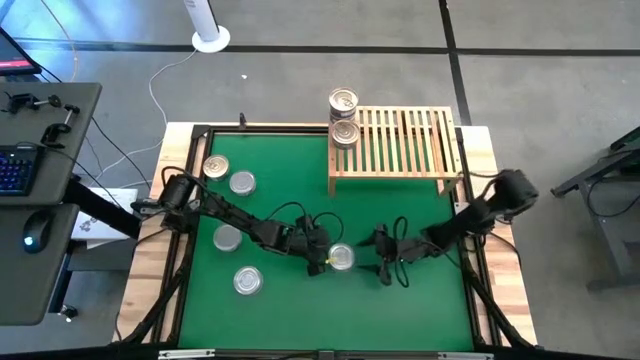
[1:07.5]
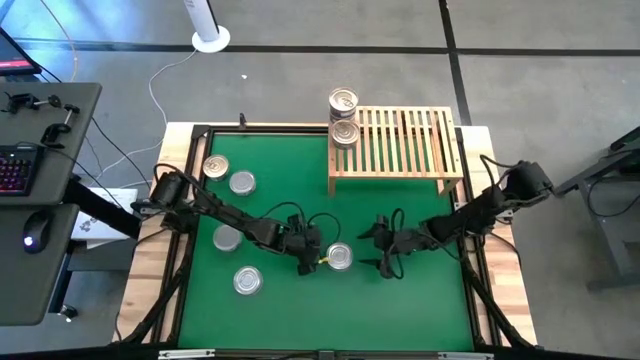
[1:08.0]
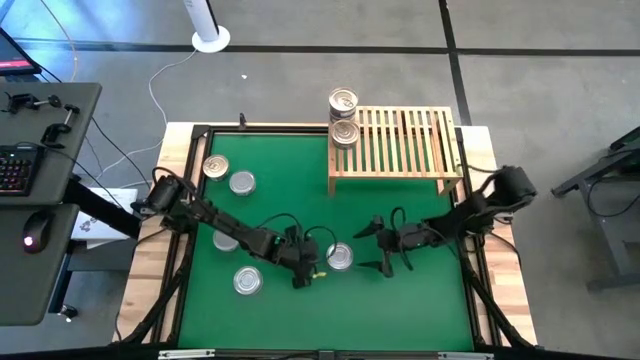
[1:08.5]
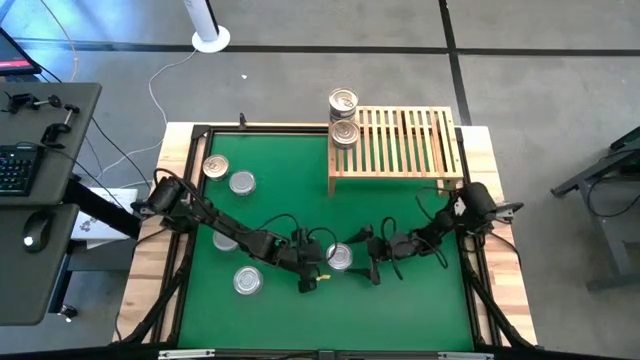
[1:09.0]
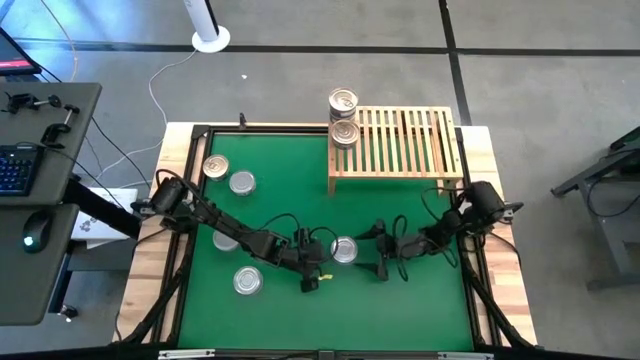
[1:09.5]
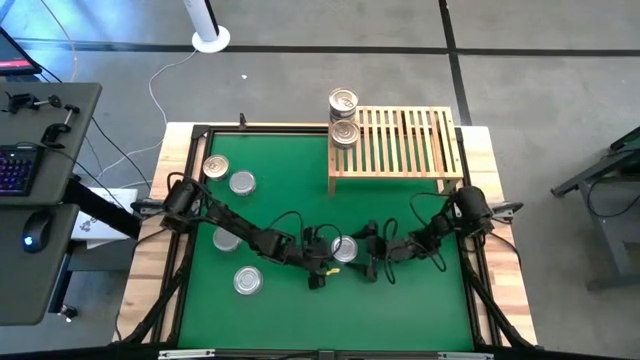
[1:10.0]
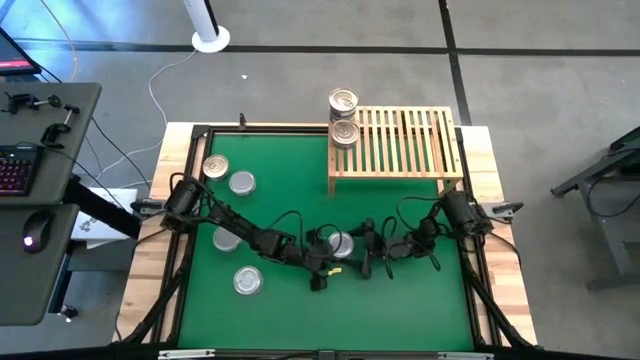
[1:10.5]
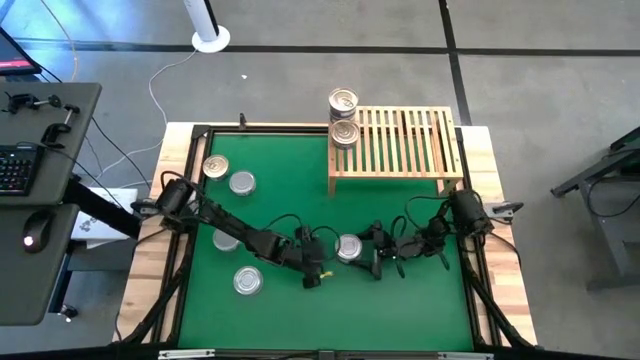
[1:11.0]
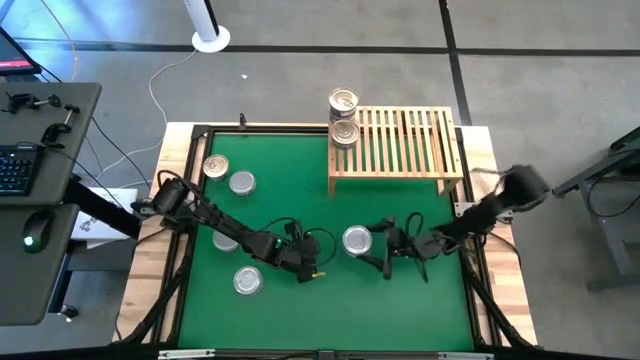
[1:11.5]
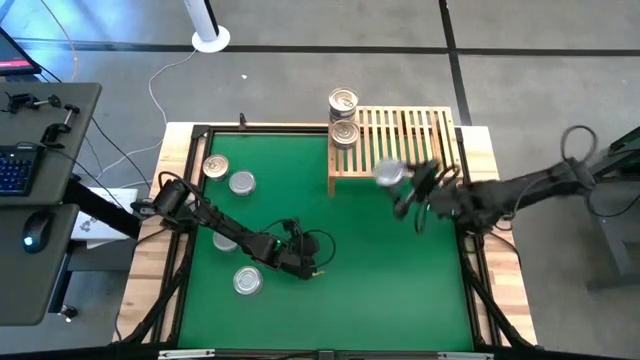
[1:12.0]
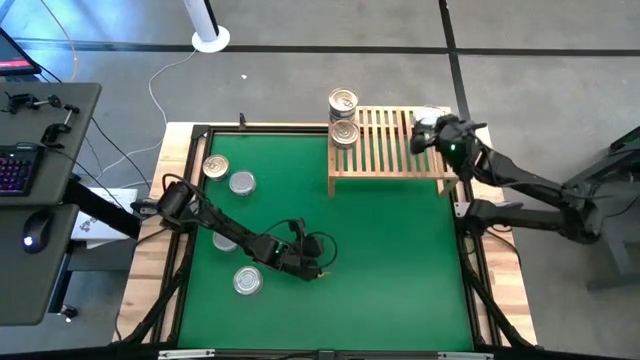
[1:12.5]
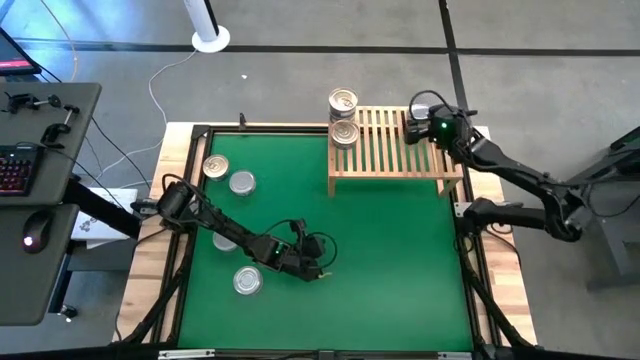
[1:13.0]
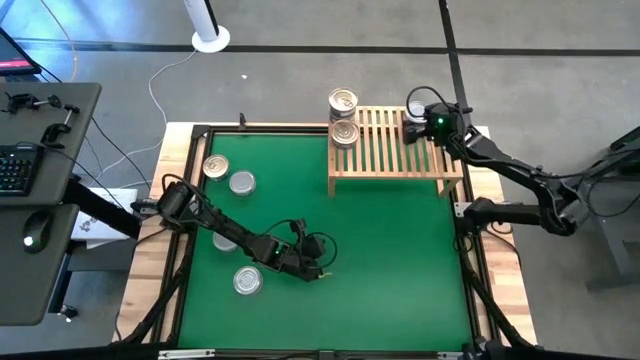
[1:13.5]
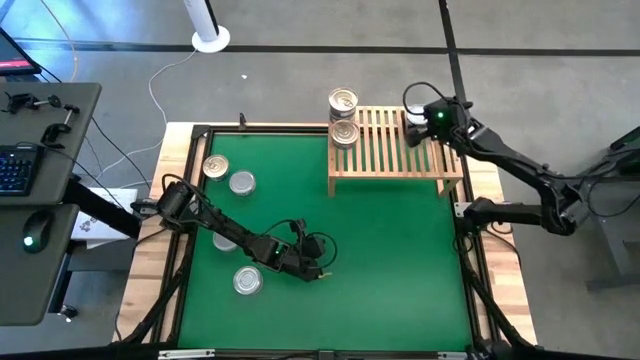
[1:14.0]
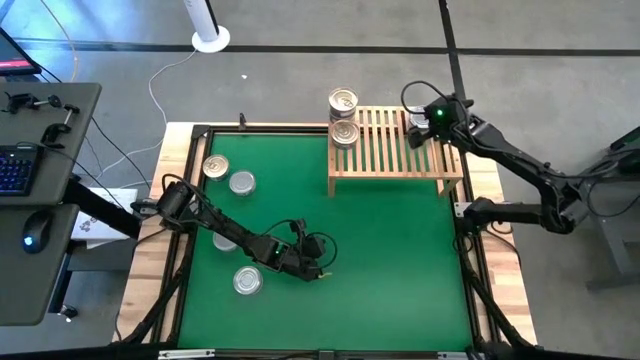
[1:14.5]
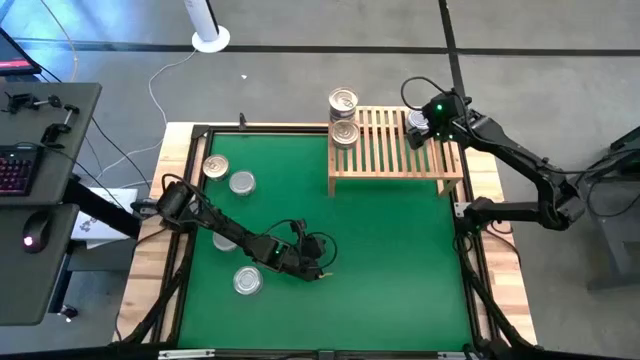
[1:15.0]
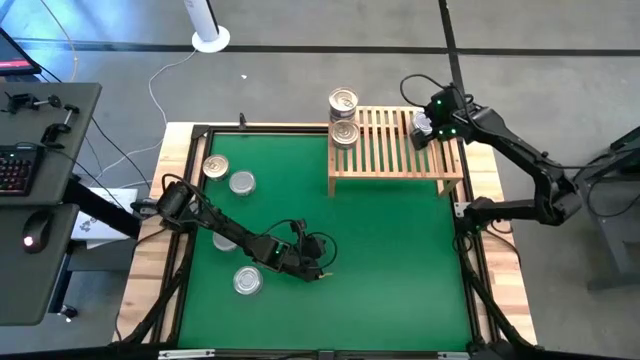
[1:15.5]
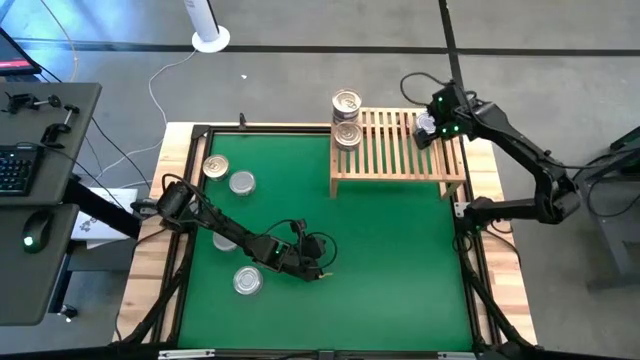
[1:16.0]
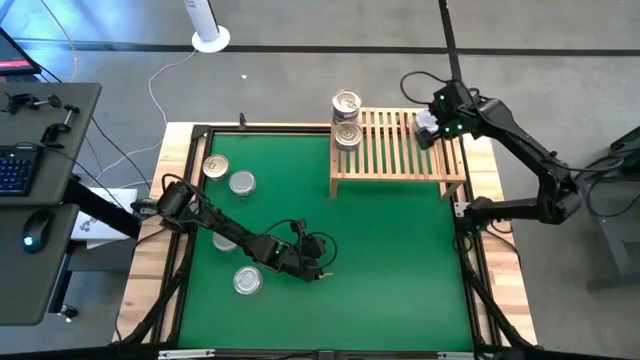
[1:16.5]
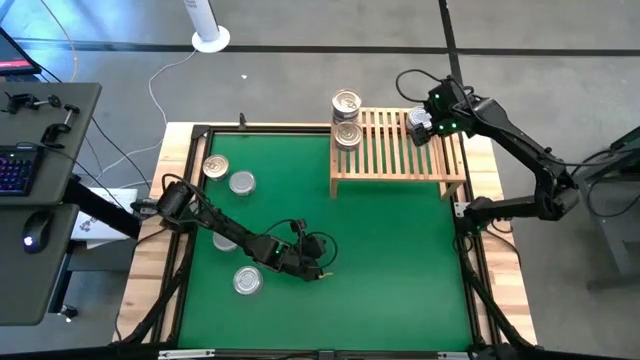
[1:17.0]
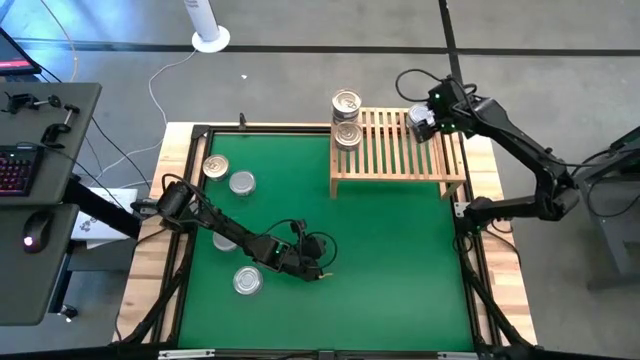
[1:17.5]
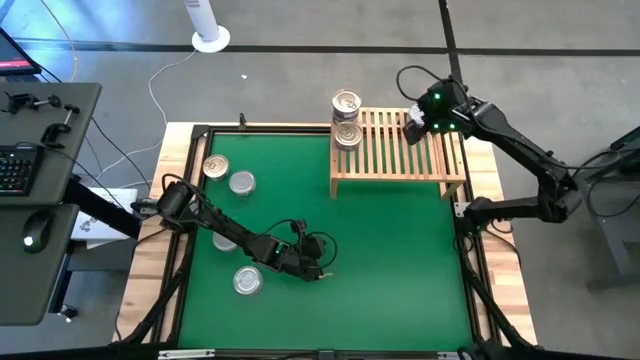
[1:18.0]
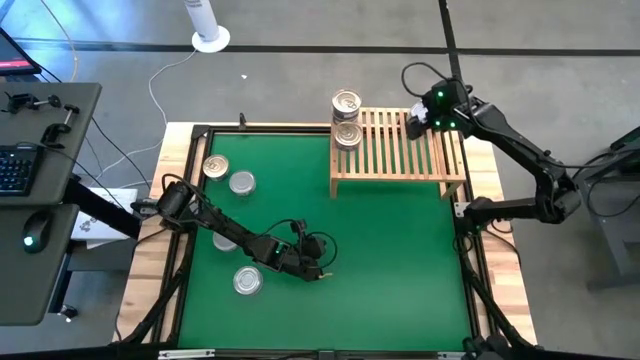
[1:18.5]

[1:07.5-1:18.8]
Task: Stack canned seafood by type on shelf
Put the green tuna can on the shelf

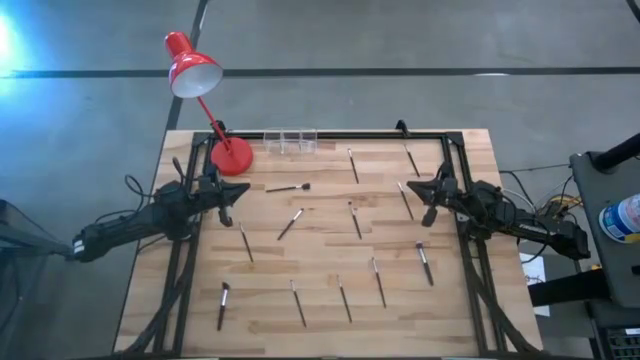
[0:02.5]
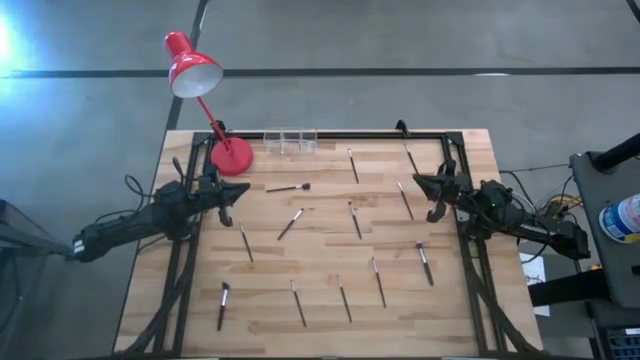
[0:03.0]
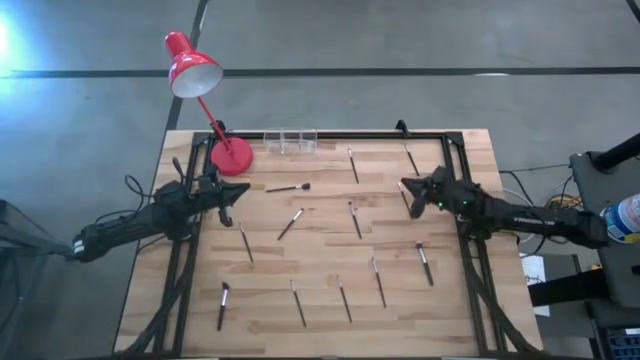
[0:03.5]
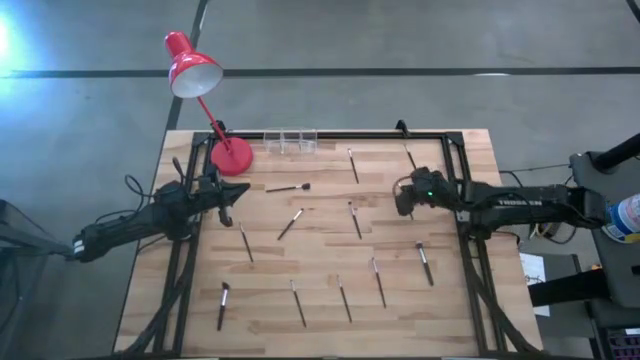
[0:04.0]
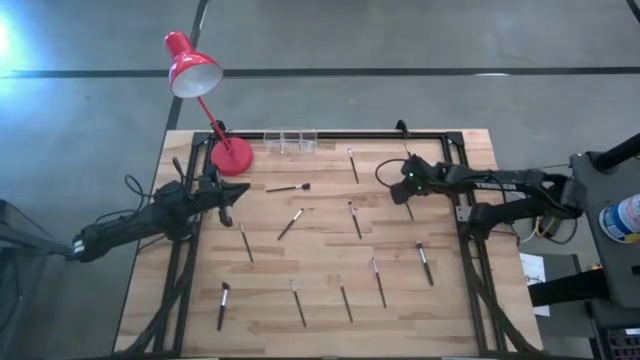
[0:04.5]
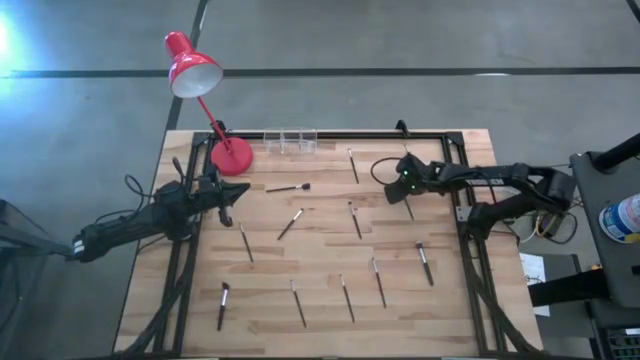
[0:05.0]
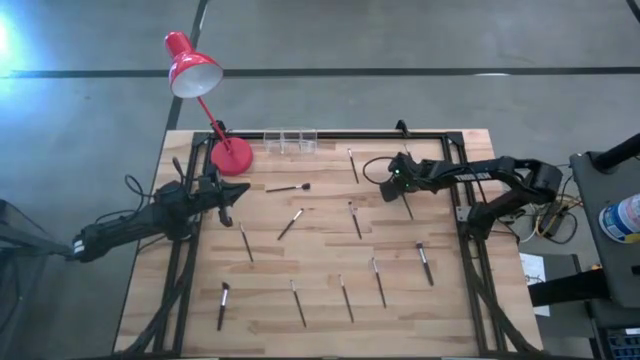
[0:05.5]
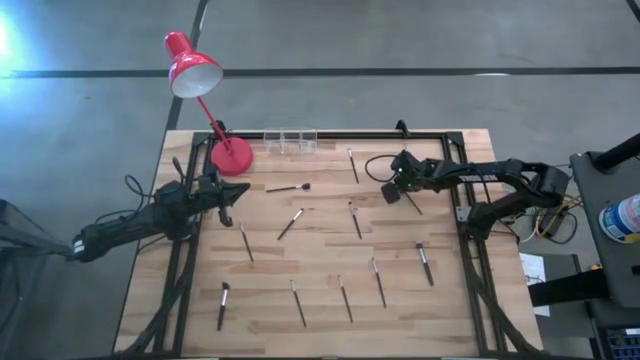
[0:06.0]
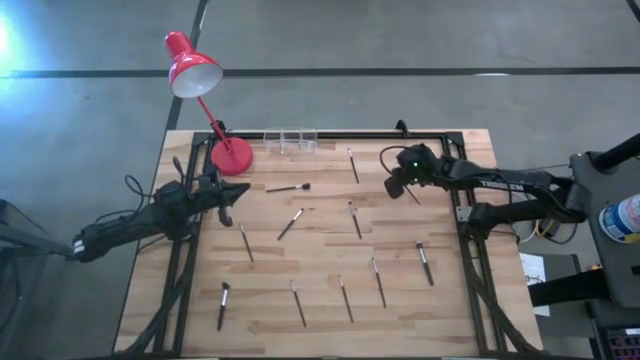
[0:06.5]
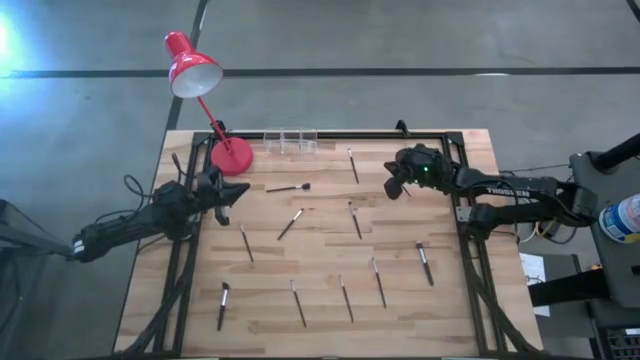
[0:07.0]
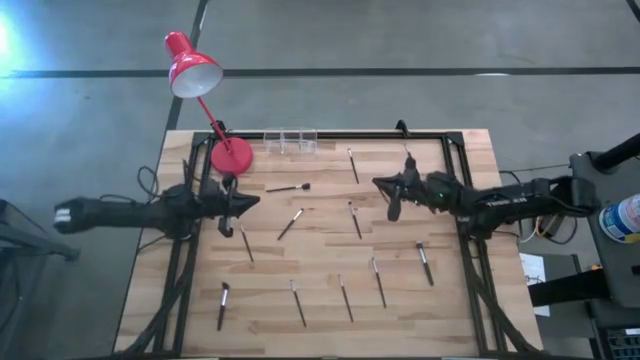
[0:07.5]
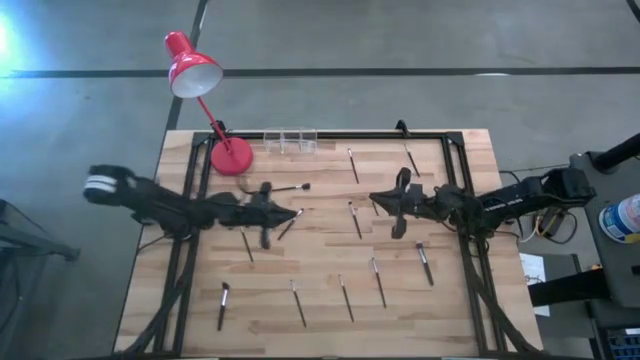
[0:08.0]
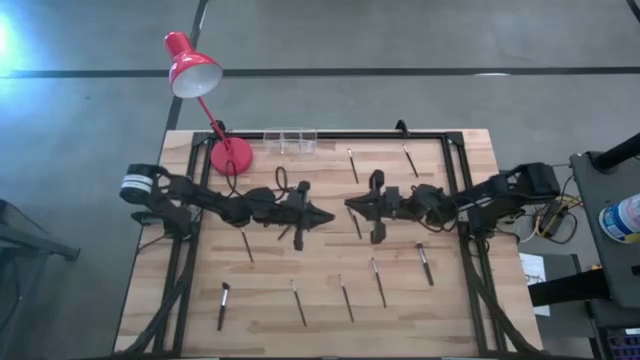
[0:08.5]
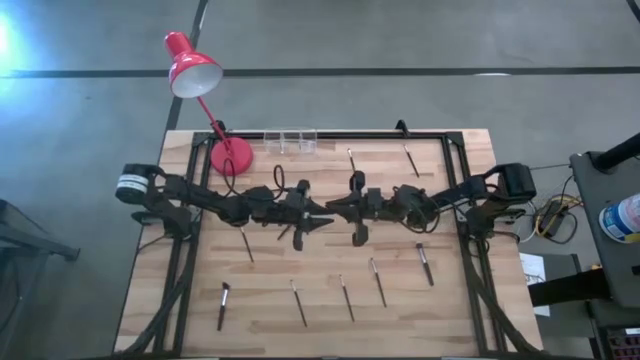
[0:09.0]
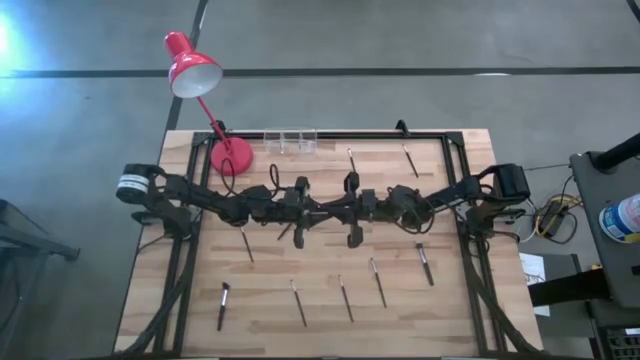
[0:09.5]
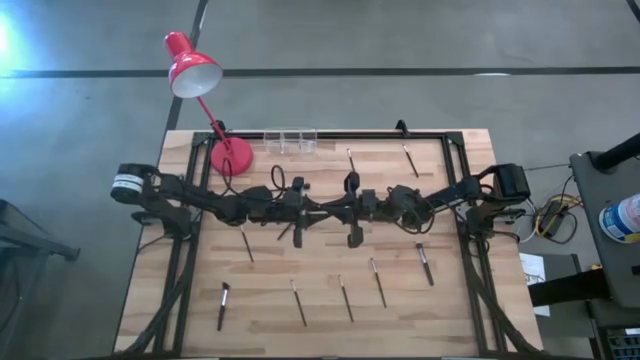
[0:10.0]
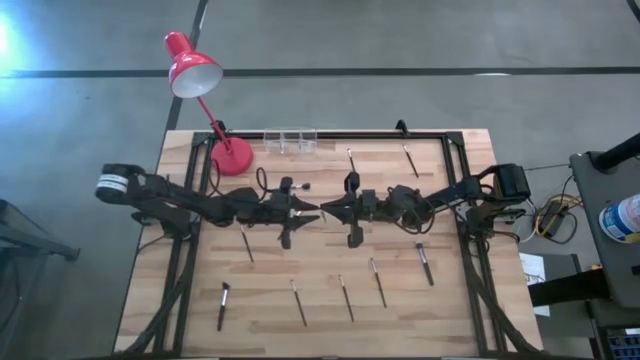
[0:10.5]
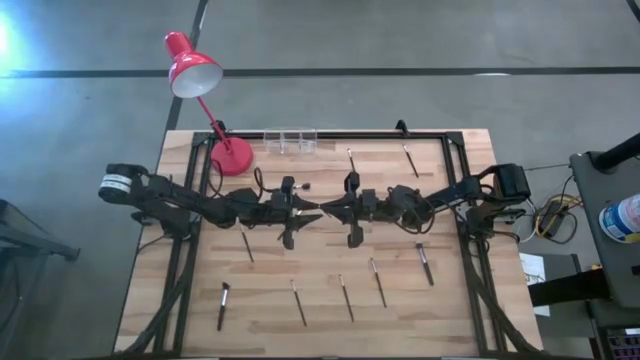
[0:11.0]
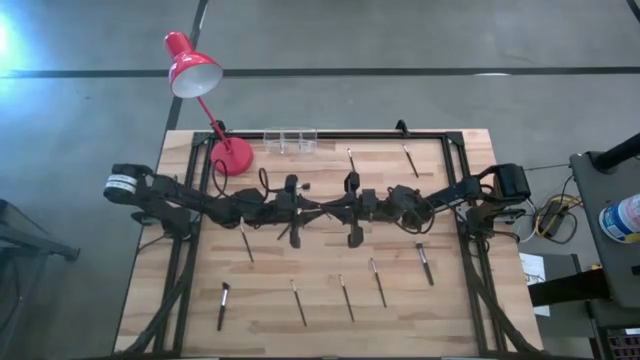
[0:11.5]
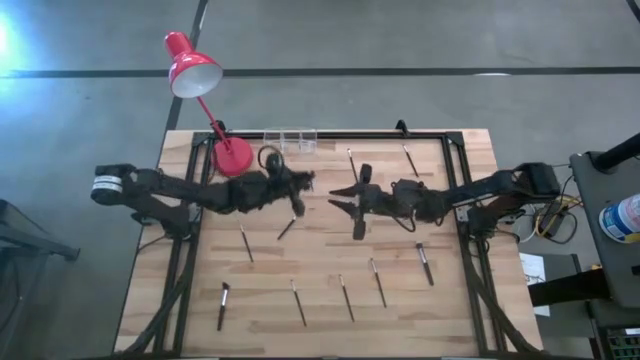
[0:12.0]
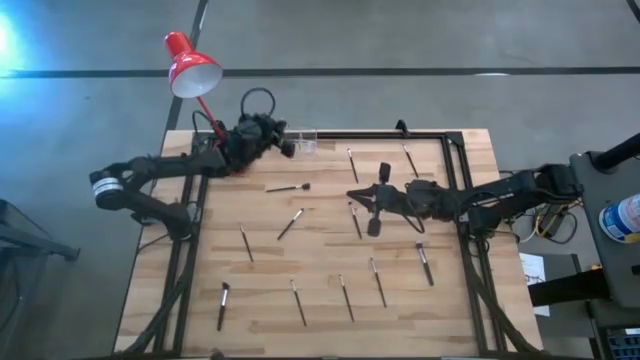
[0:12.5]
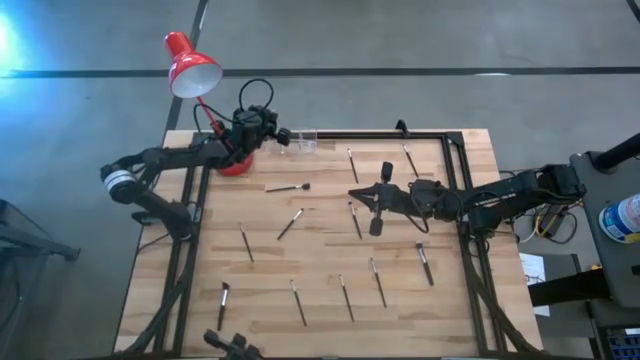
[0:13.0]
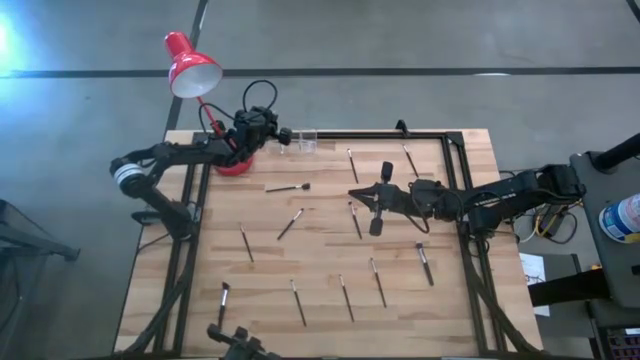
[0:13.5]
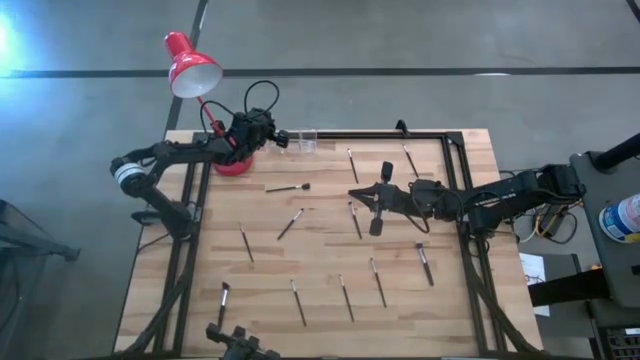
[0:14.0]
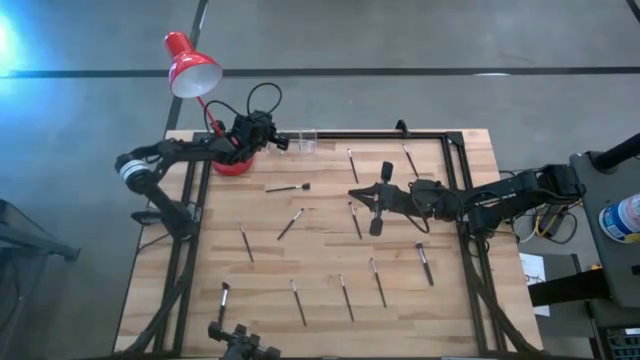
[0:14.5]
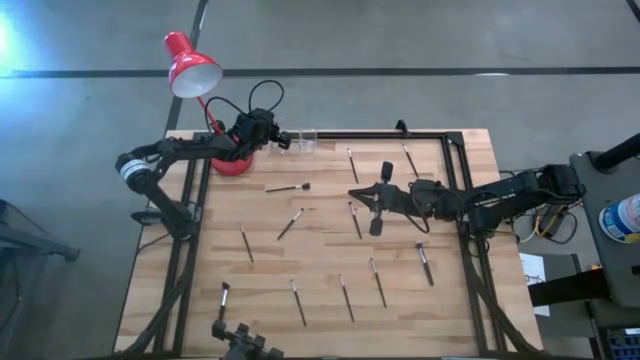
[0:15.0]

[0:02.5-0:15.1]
Task: Pick & Place Makeup Supplies
Put the makeup brush into the transparent organizer
